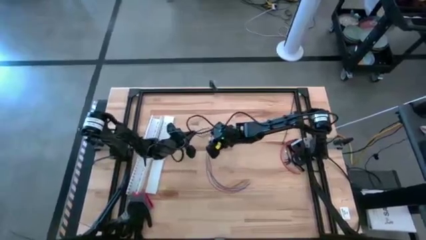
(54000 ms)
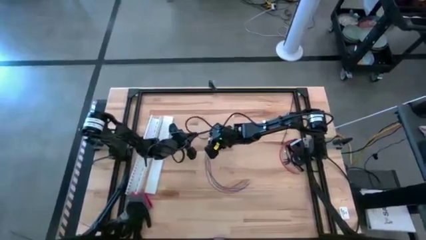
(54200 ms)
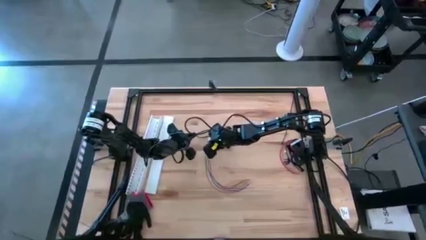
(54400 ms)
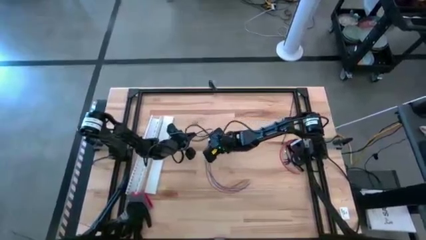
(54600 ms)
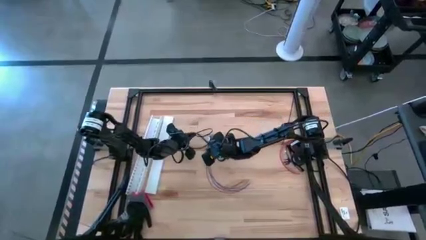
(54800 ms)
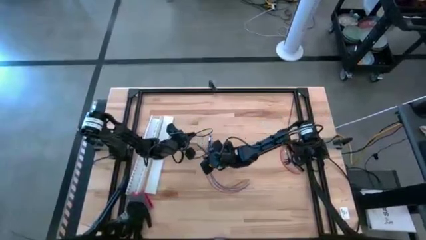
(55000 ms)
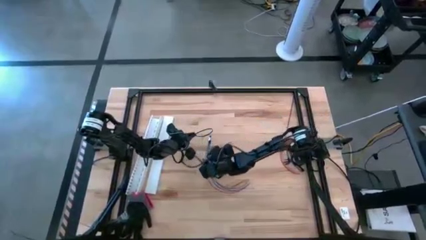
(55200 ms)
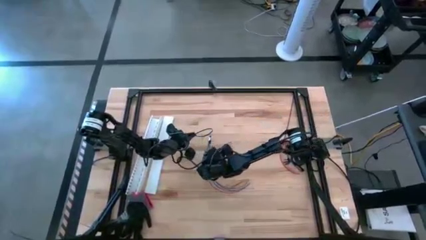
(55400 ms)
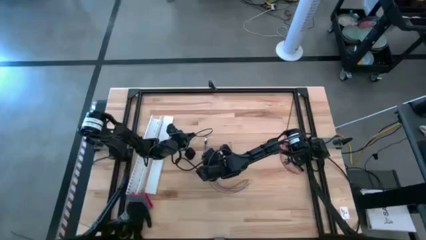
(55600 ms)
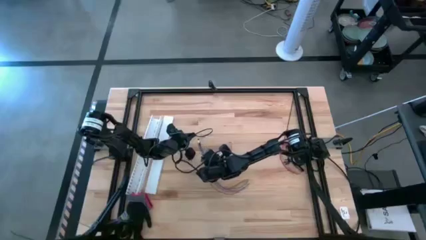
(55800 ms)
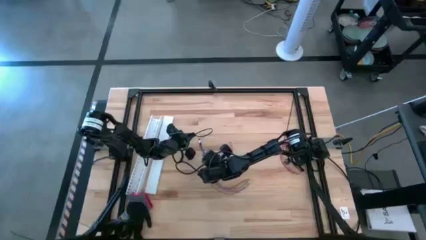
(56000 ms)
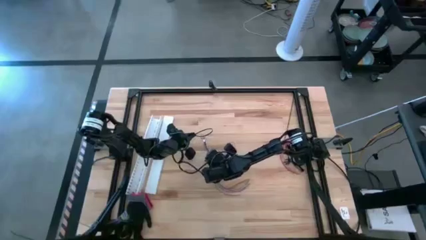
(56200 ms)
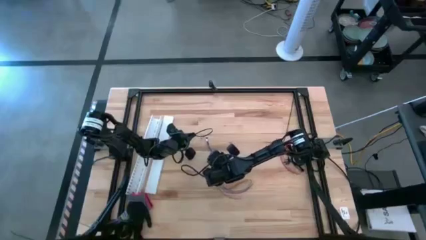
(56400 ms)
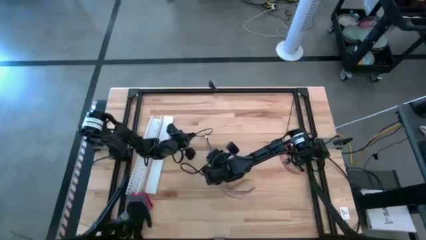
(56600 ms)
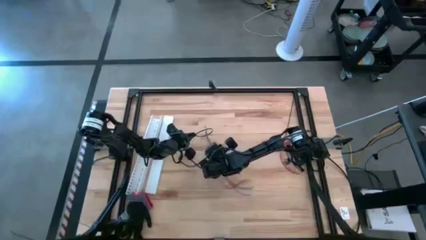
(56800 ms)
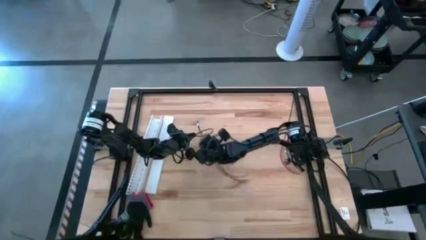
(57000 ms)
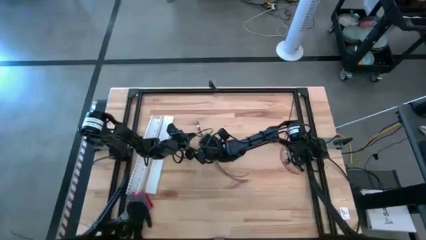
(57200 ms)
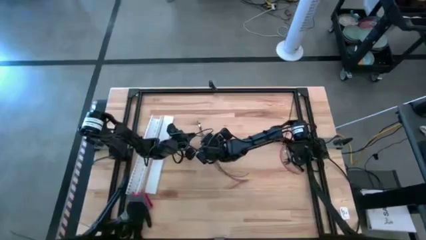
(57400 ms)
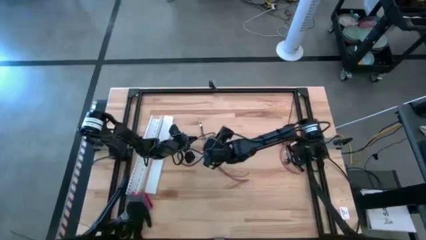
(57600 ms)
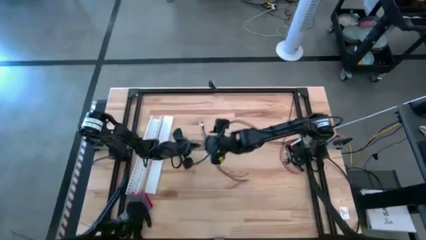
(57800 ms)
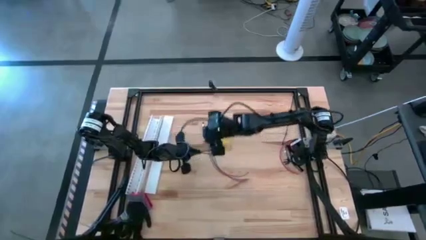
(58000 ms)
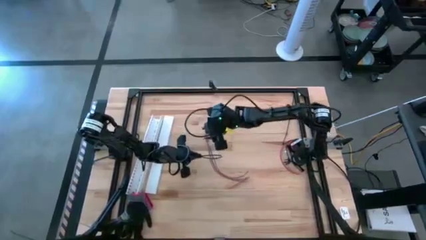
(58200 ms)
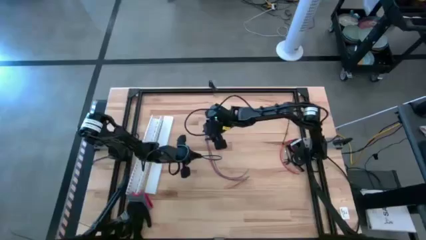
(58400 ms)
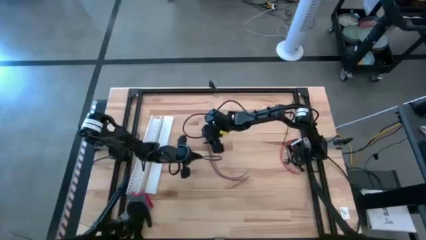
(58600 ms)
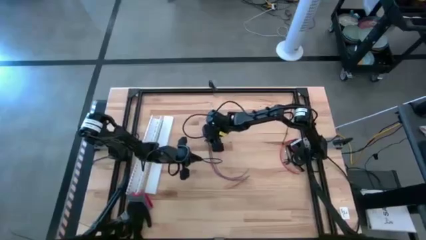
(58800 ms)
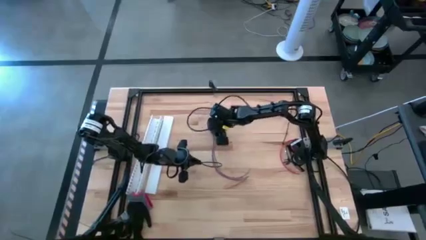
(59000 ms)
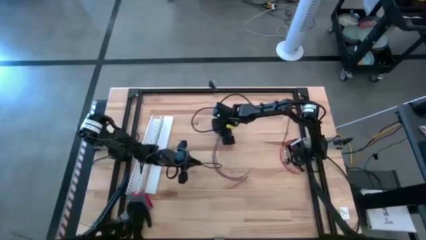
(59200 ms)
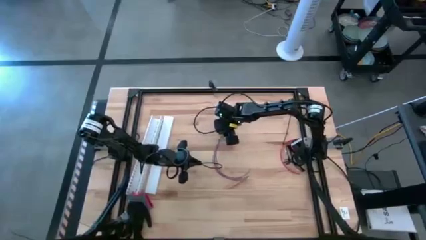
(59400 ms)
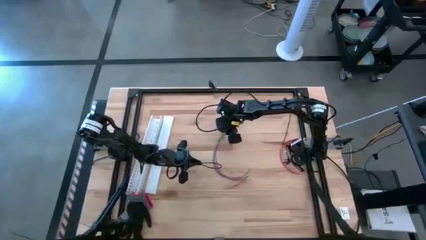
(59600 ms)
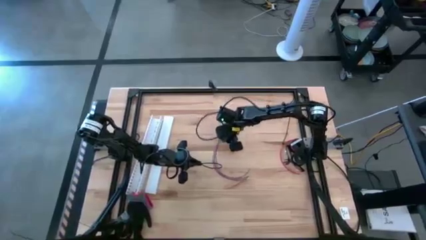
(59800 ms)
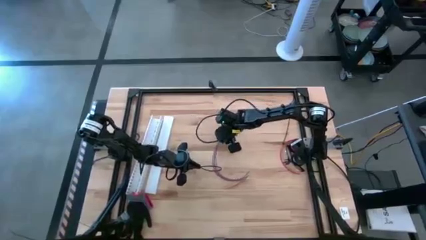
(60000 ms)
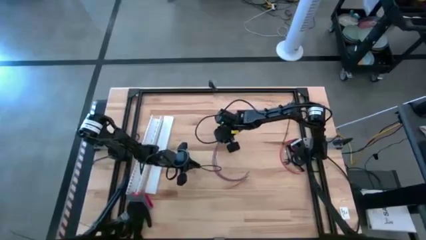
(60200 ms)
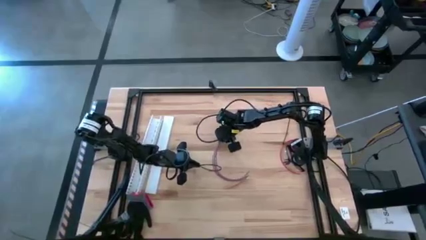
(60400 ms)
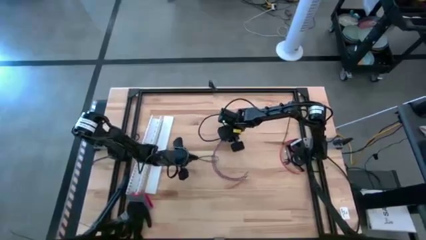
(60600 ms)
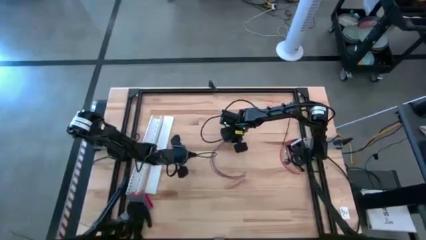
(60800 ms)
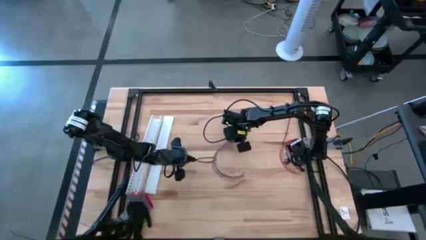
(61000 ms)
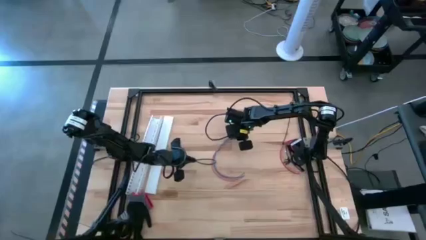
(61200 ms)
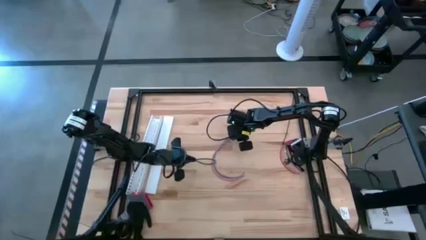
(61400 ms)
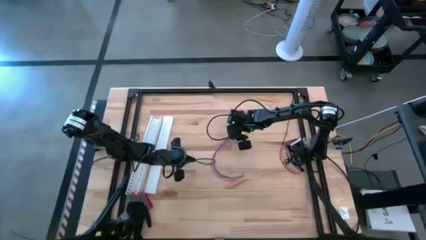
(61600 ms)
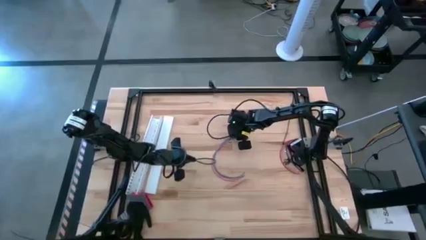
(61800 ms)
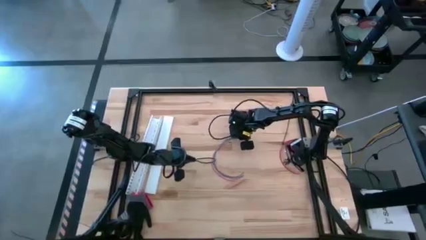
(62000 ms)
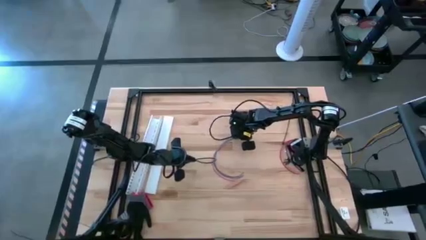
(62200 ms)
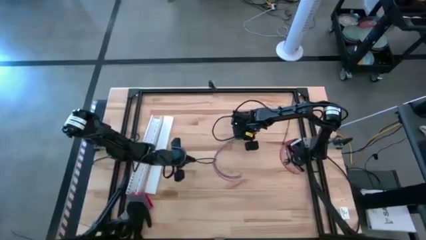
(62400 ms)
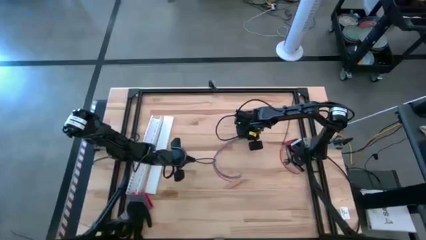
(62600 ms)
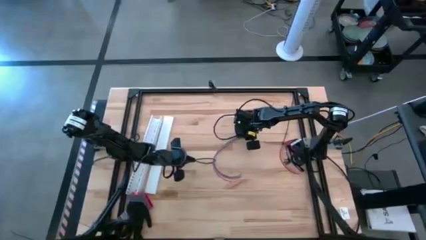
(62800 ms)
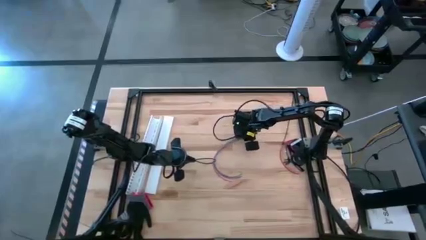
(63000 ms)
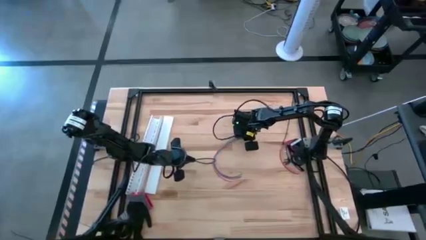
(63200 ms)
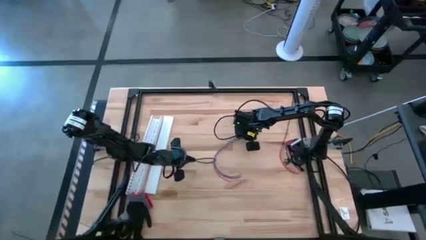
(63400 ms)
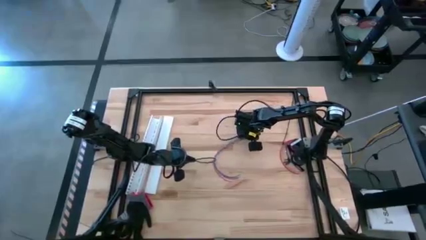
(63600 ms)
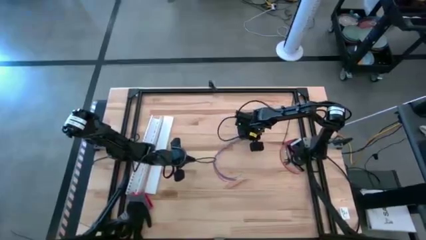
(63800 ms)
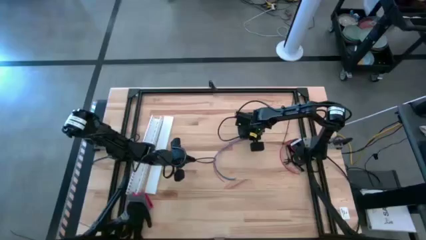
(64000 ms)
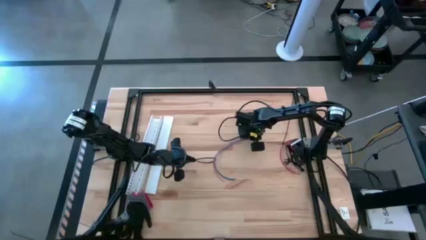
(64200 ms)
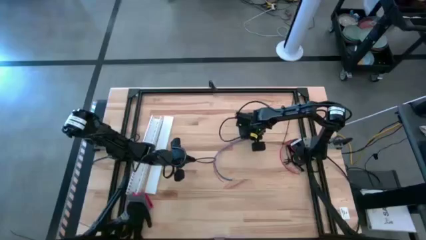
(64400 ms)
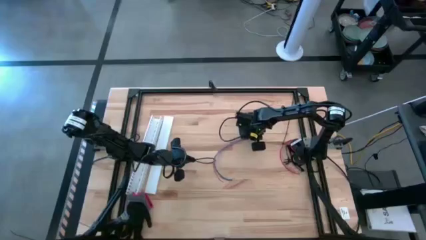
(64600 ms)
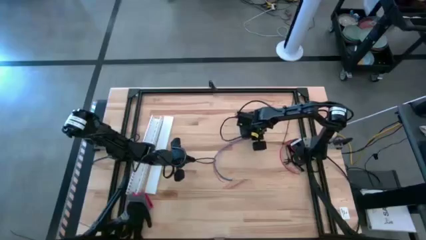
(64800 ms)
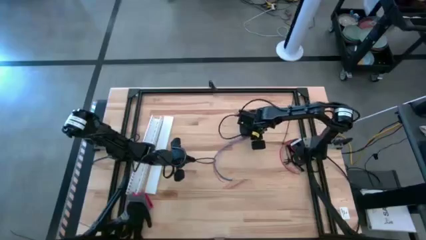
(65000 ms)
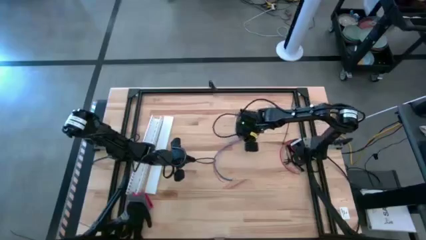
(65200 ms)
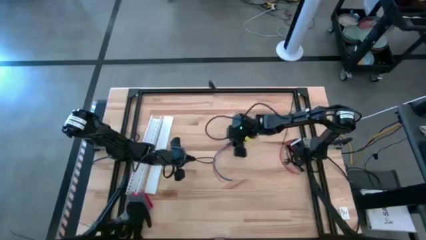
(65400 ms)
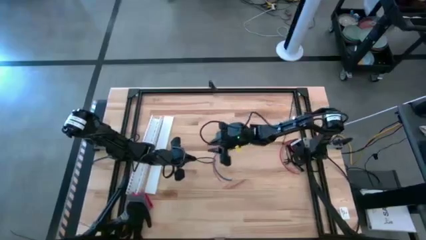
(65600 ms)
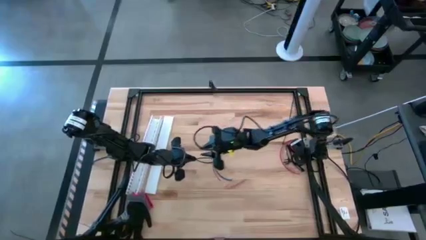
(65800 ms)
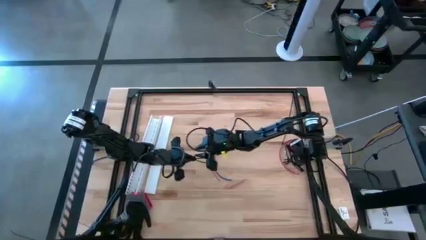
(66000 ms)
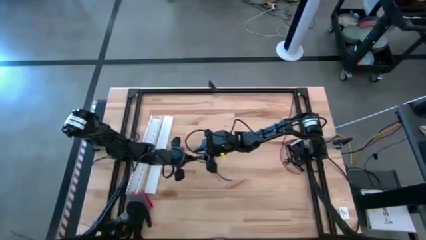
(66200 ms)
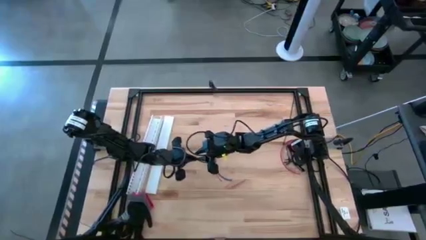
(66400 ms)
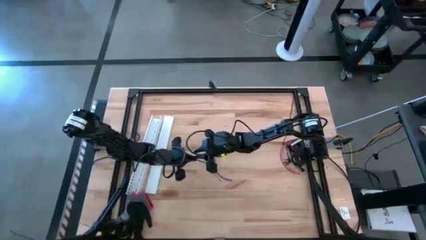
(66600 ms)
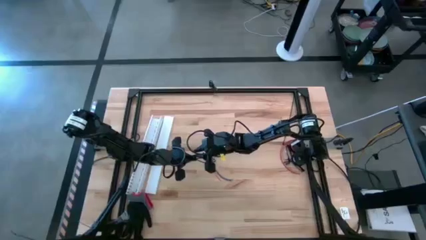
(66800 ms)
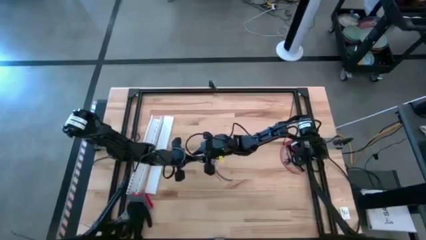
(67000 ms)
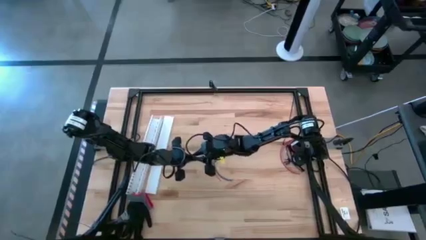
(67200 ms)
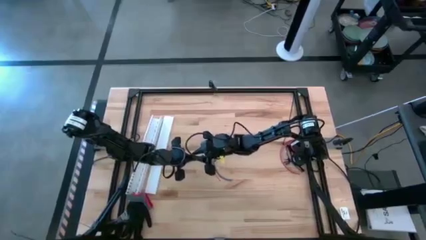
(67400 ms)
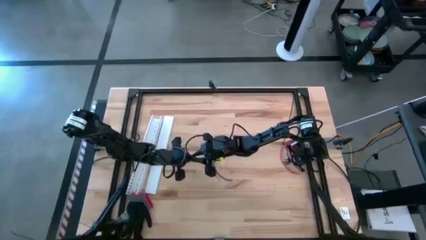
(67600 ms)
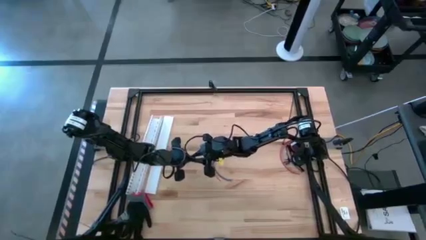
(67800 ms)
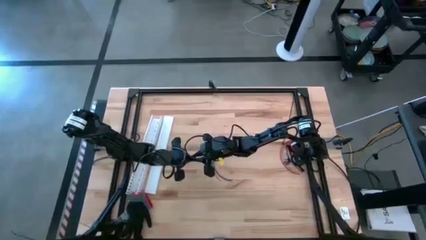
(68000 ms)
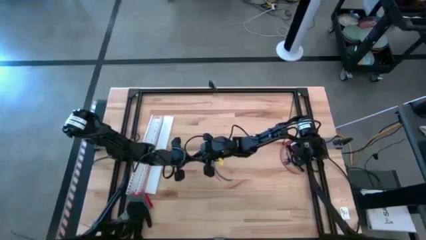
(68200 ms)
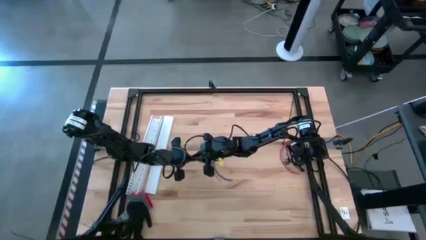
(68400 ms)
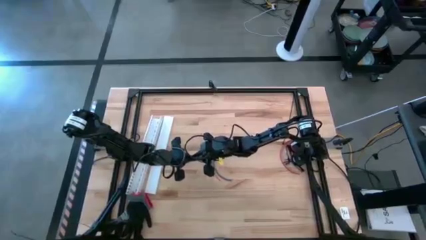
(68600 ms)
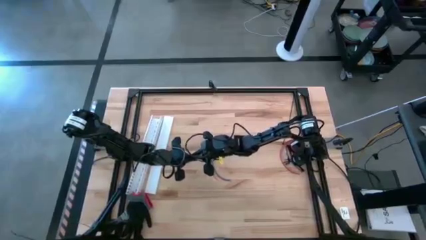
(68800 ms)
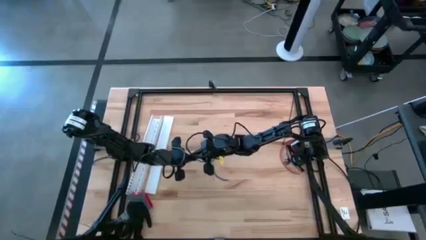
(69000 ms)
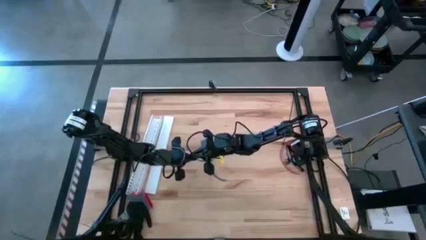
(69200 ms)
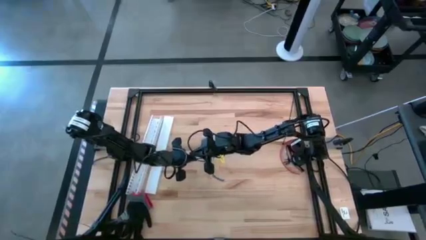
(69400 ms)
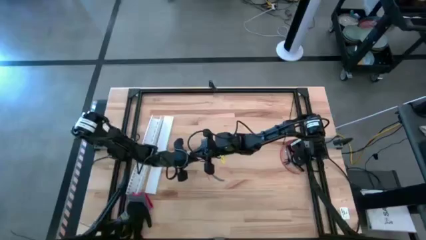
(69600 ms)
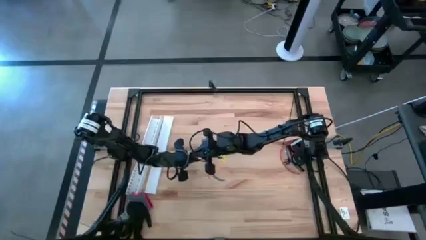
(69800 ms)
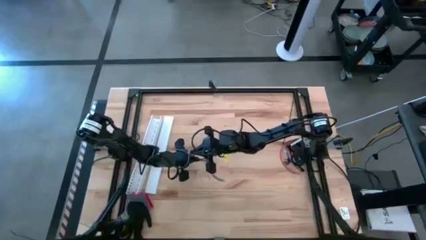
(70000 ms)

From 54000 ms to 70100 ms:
Task: Ziptie cables
Wrap the cable wires using bottom black ziptie
